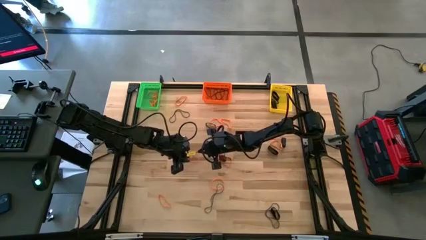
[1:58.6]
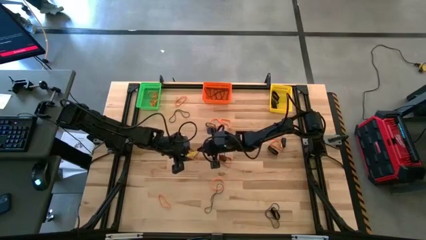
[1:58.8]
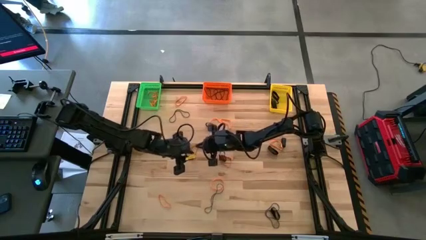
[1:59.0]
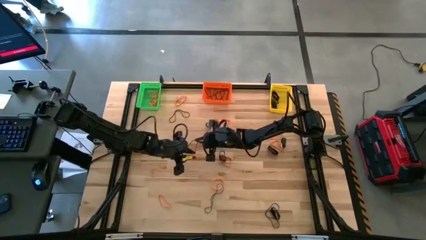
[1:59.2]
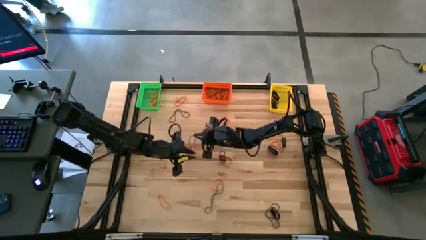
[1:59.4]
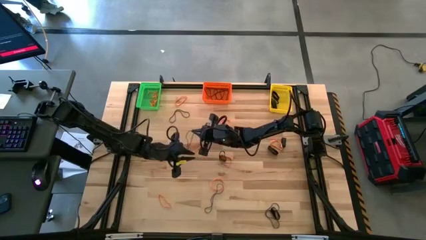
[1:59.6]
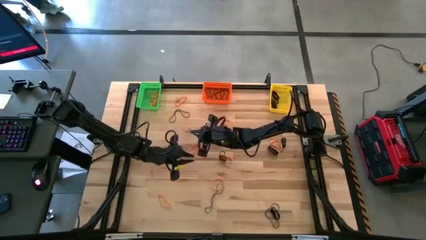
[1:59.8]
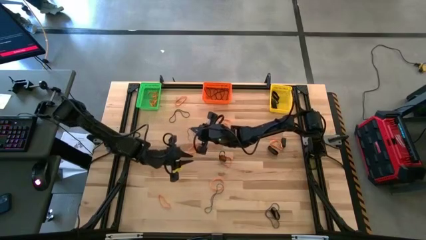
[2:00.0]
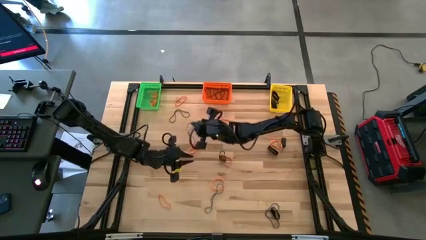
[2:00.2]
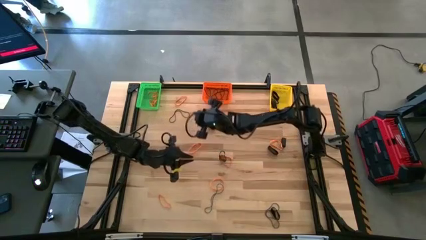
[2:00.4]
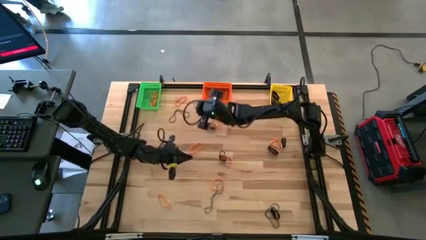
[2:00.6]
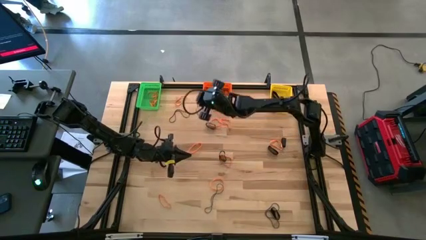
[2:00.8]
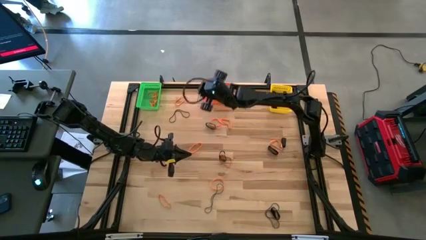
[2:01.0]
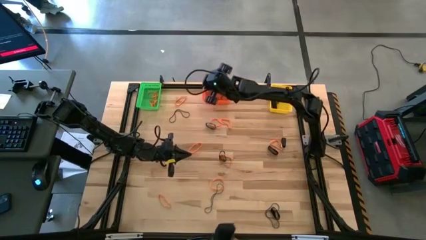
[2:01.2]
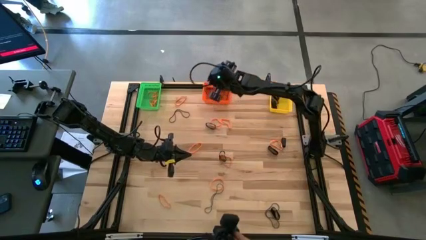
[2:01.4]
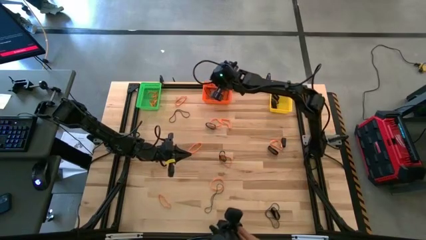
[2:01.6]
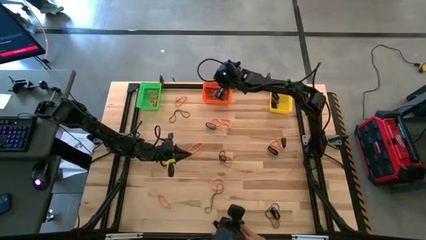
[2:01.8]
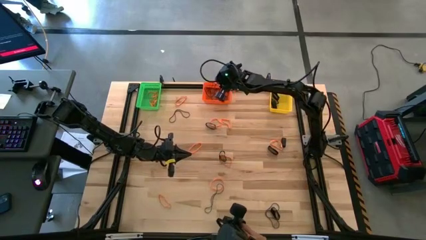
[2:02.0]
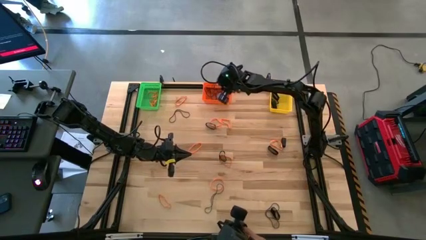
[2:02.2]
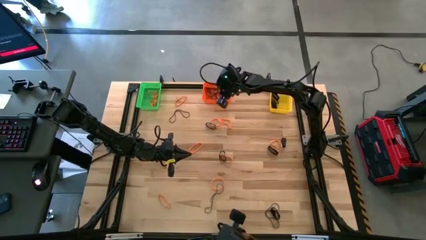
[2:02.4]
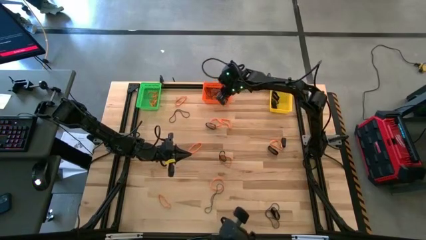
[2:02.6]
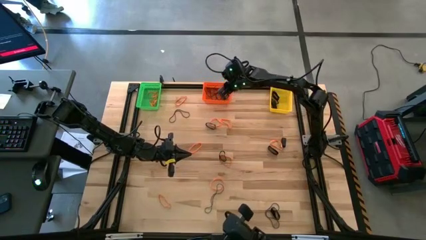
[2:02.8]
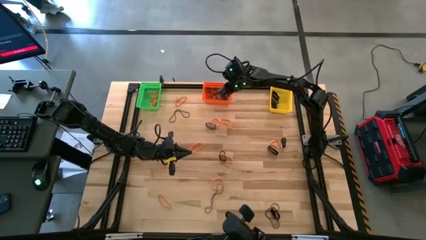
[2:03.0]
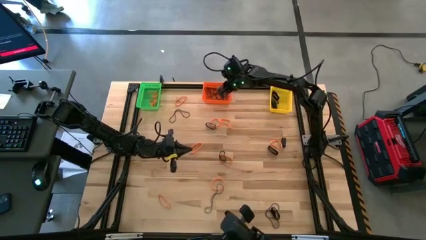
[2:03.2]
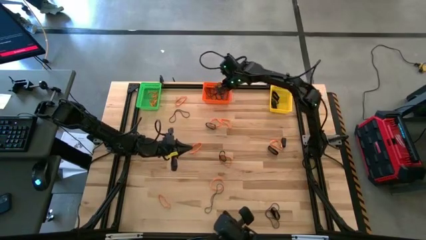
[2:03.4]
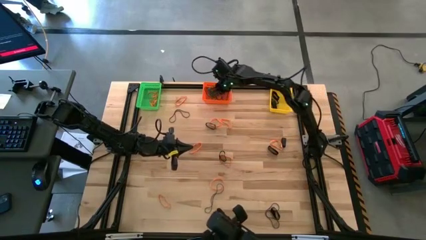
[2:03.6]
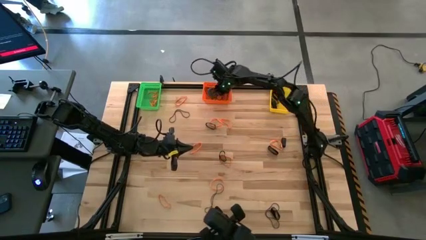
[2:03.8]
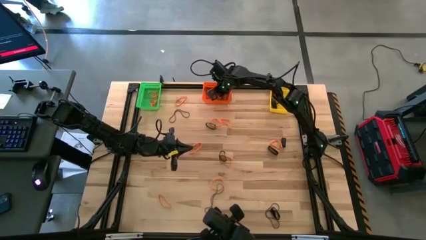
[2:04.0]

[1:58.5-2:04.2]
Task: Sort rubber bands into baskets
Put the middle left blue rubber band into the orange bin

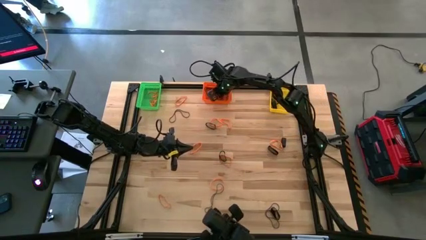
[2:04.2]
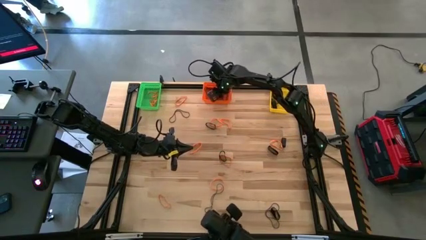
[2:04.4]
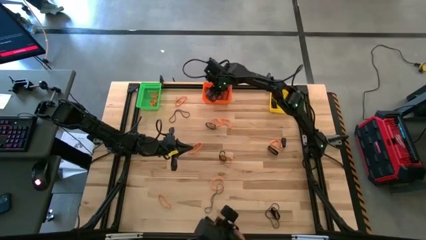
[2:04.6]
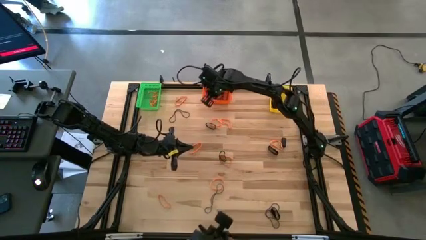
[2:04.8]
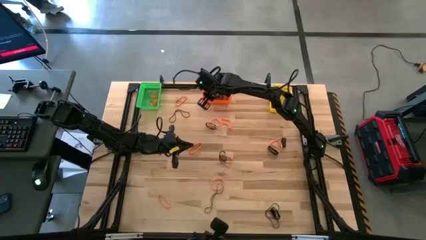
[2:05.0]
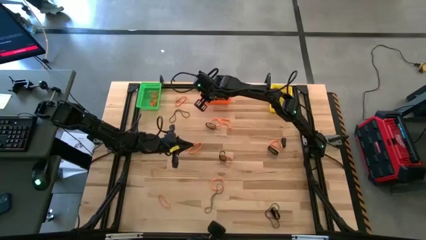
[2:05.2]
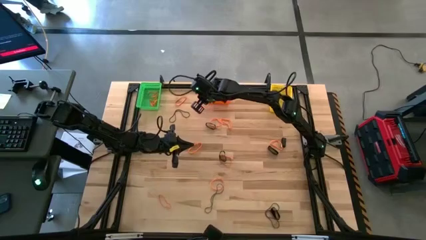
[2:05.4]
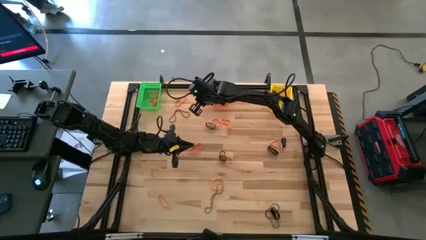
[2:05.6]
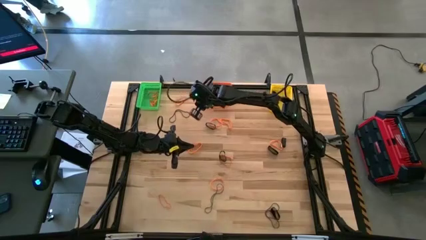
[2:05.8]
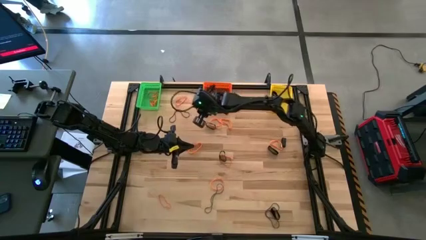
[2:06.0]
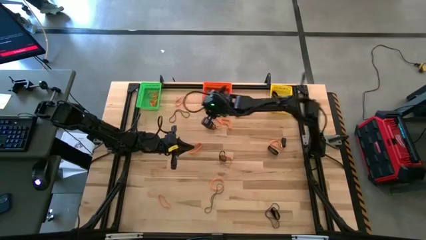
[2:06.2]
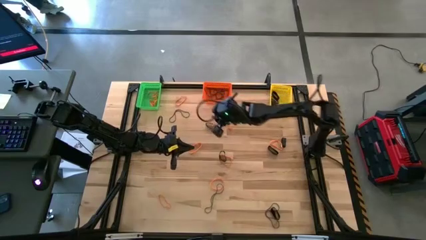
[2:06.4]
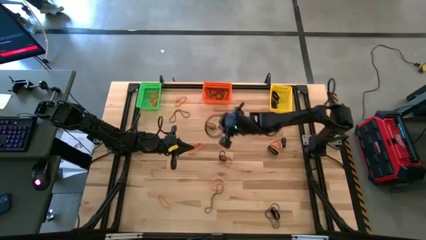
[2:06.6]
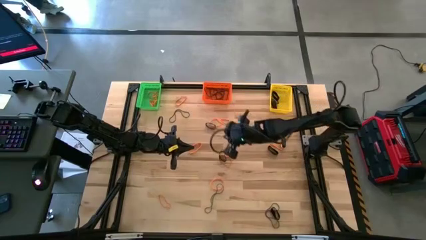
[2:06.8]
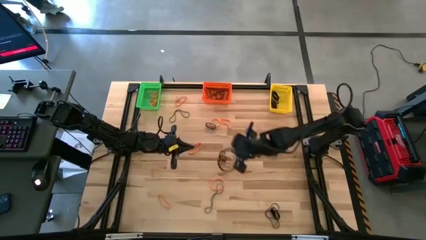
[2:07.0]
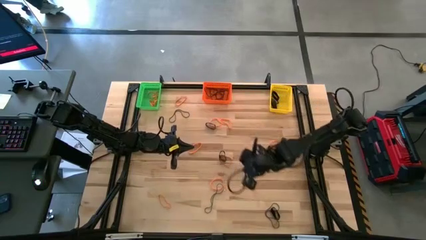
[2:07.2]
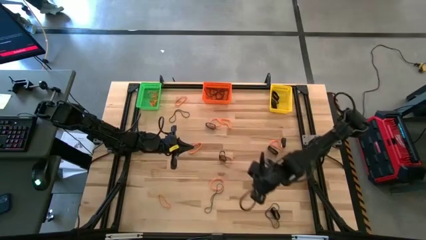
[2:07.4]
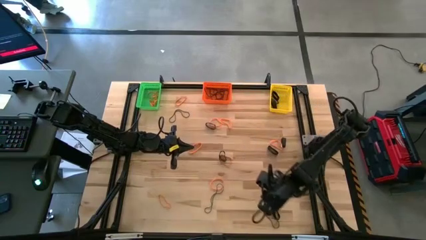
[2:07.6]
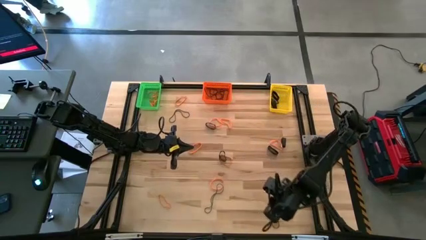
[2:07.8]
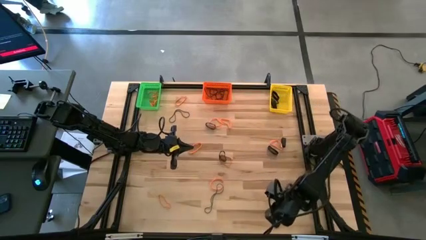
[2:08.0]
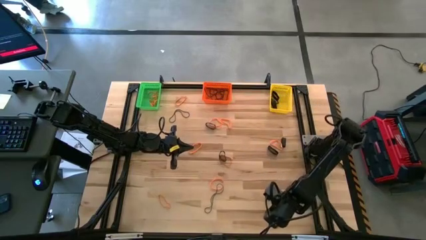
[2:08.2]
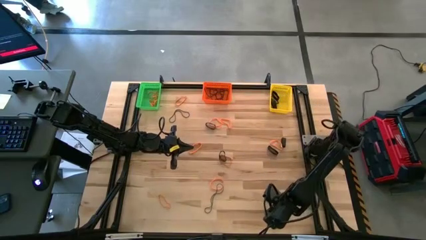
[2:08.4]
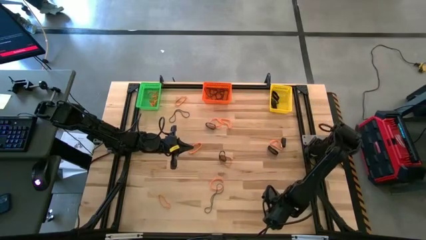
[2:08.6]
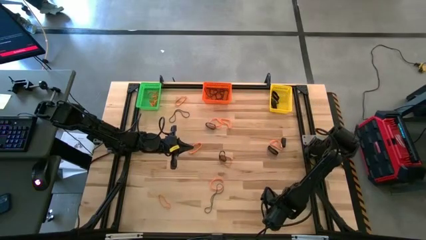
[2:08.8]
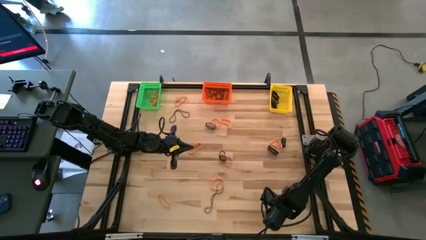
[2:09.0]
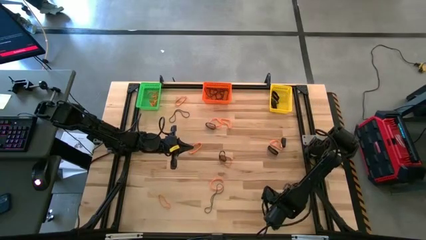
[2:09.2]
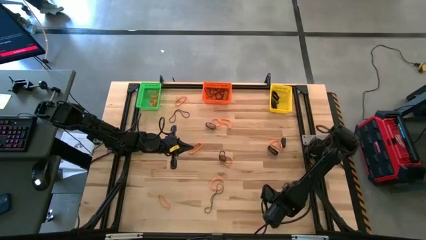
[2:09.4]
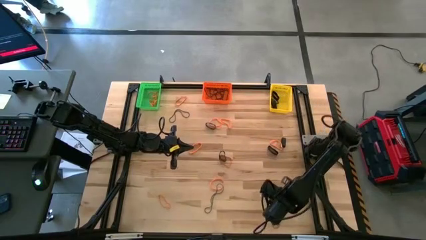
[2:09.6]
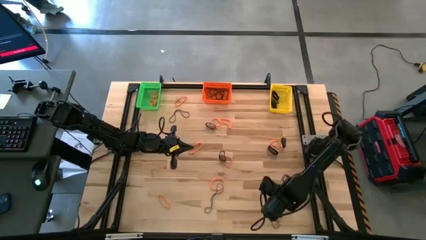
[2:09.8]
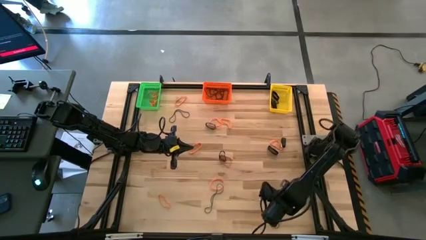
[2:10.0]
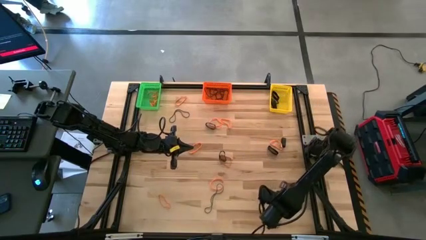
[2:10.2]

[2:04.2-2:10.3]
Put the bottom black rubber band into the yellow bin

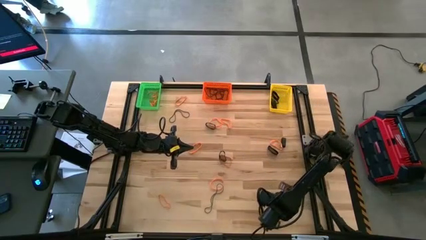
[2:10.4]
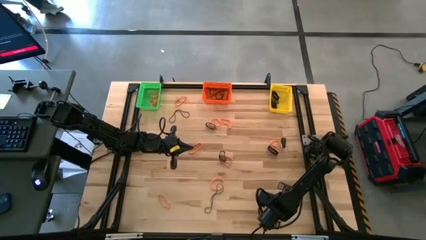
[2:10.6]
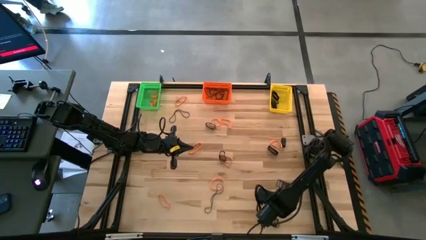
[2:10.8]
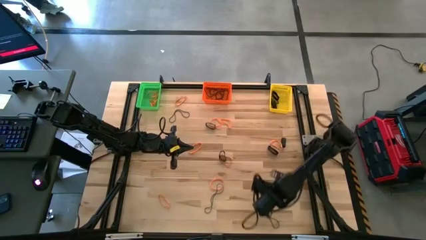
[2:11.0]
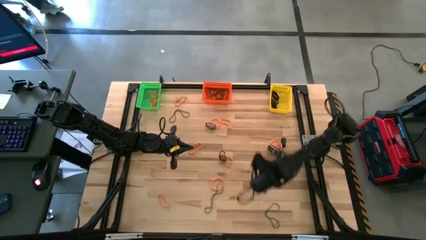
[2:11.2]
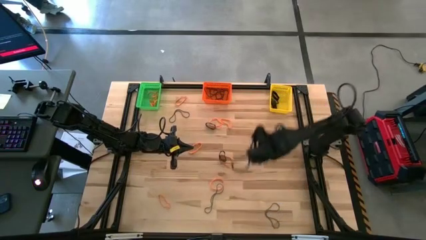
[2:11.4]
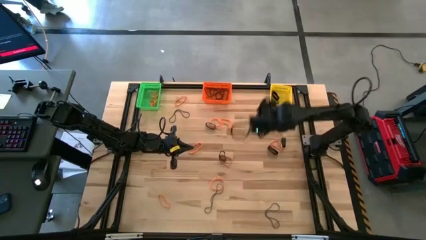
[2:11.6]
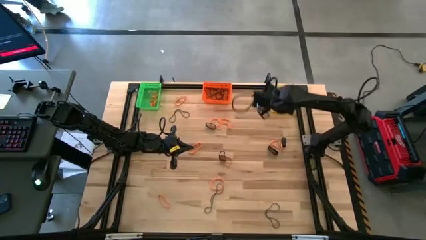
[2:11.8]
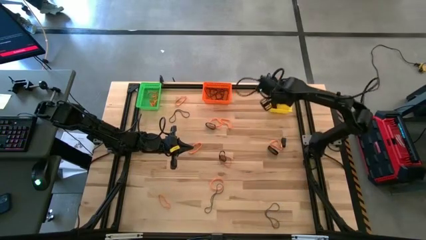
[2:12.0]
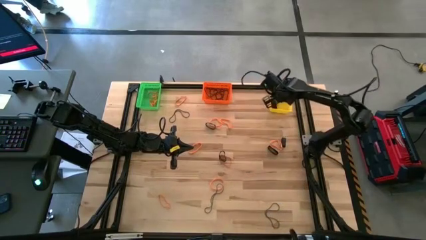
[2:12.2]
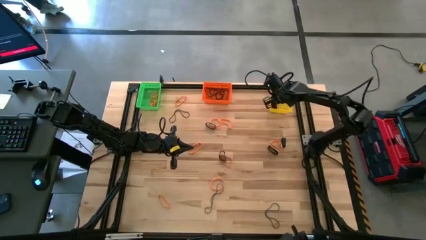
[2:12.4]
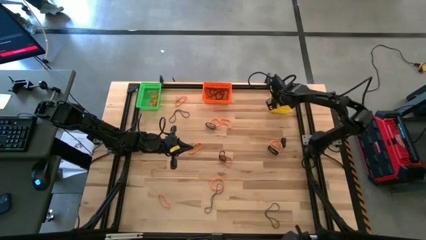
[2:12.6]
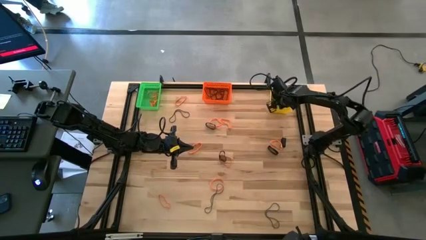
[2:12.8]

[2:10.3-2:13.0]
Put the bottom black rubber band into the yellow bin

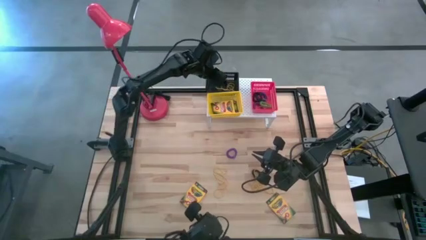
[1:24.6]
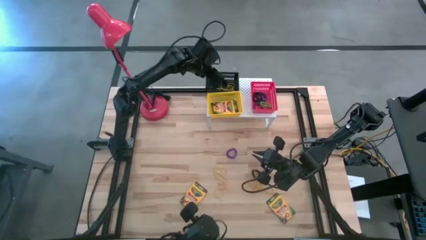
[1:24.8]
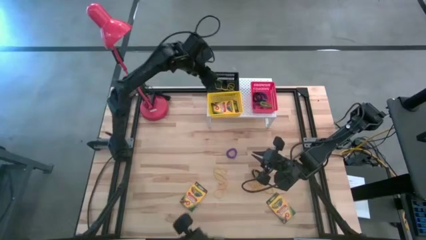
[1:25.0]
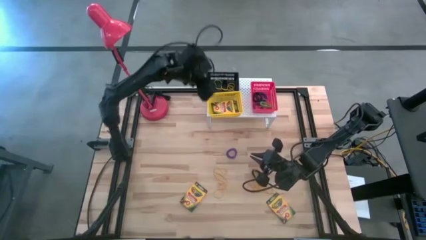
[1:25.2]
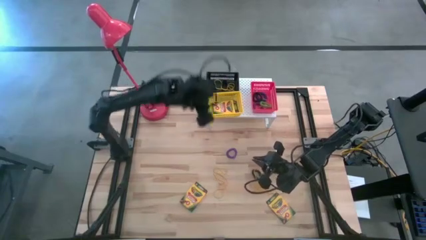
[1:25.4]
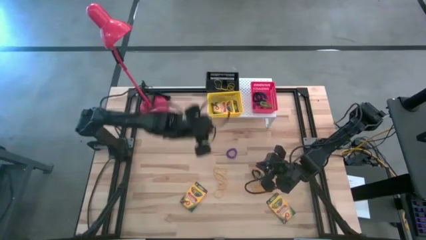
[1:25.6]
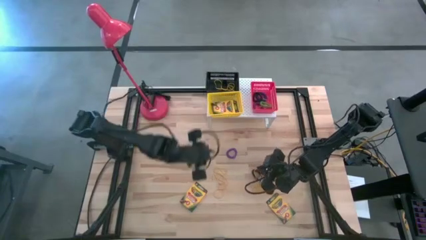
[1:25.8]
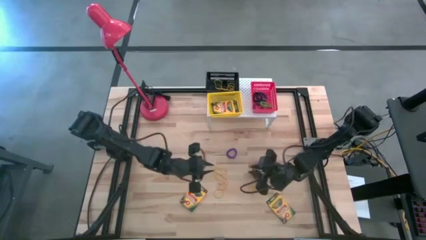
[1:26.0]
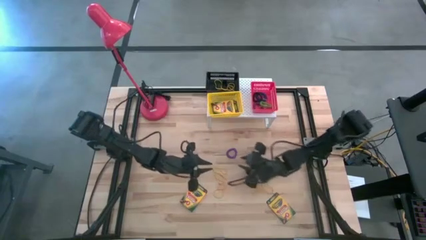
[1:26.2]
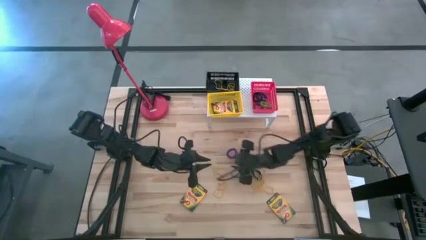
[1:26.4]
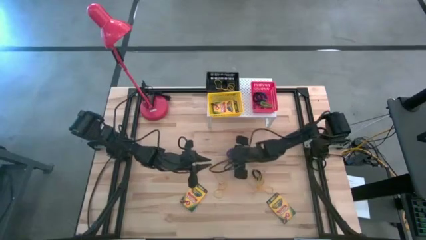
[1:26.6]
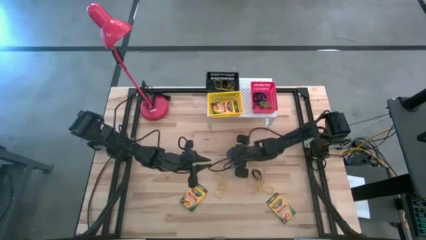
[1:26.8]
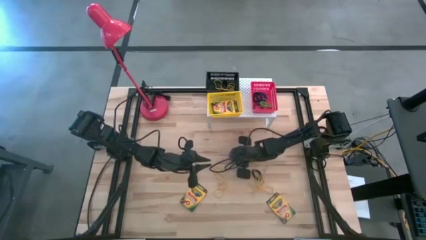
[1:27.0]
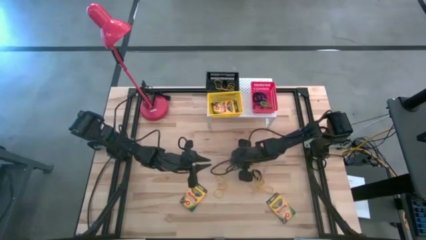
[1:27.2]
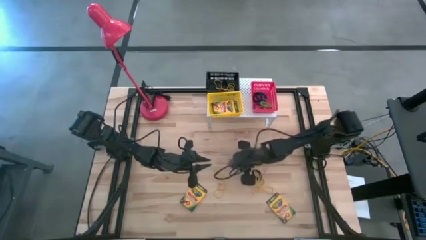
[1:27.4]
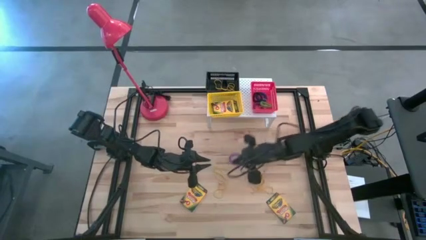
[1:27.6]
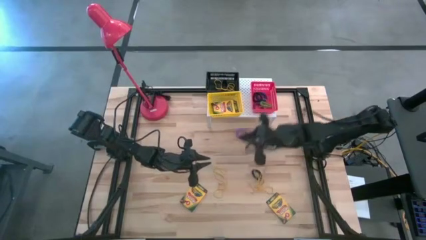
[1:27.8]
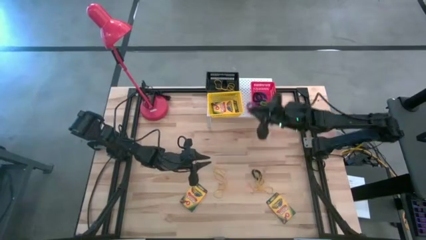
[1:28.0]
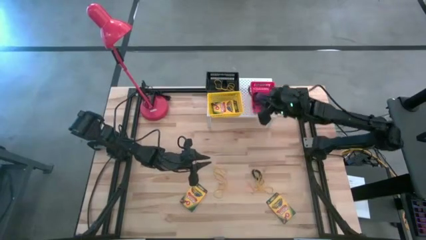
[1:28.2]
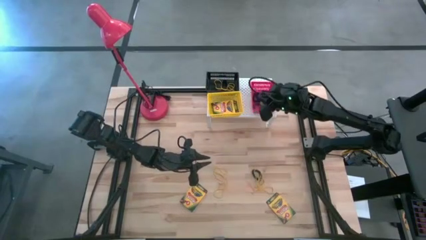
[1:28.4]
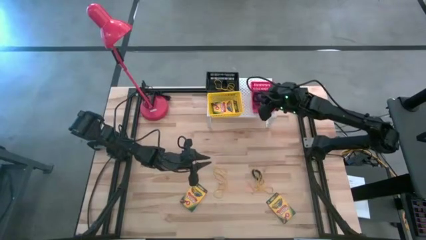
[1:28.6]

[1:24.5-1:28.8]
Task: Pick & Place Office Desk Supplies
Put the purple spring keychain into the red bin on the shelf
